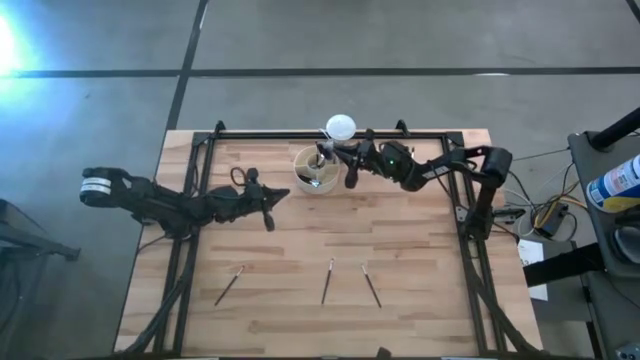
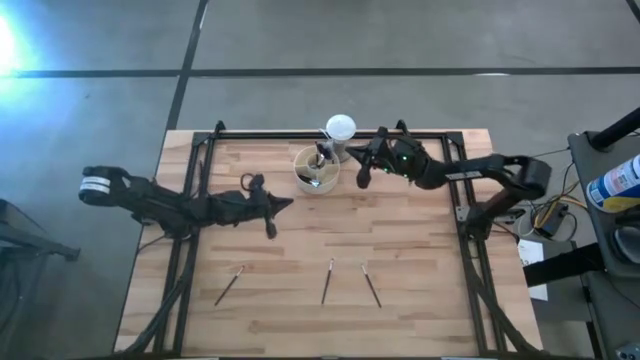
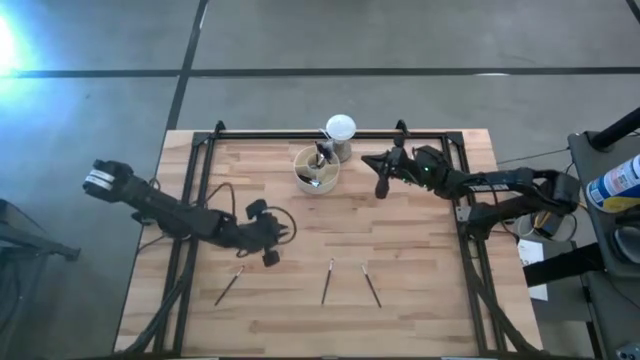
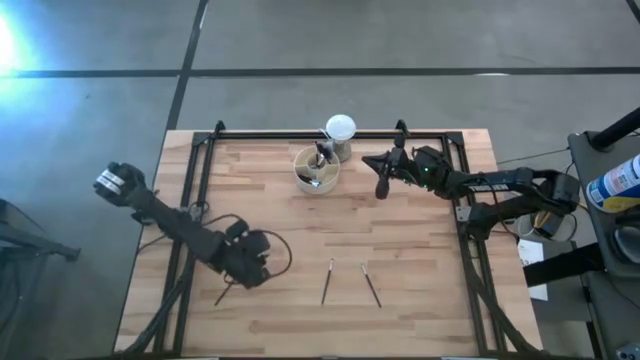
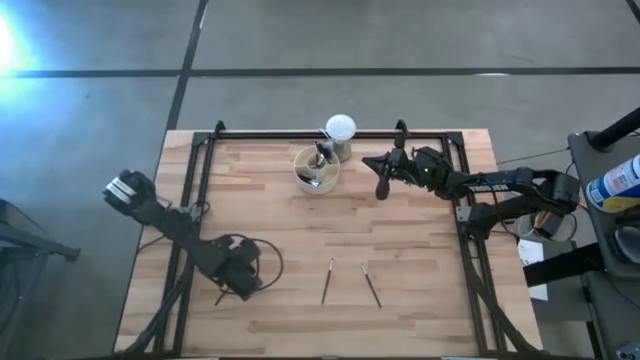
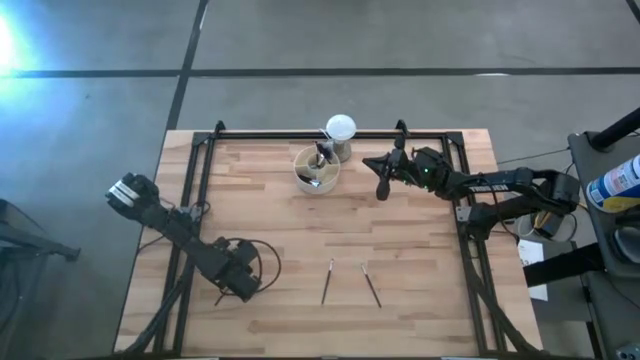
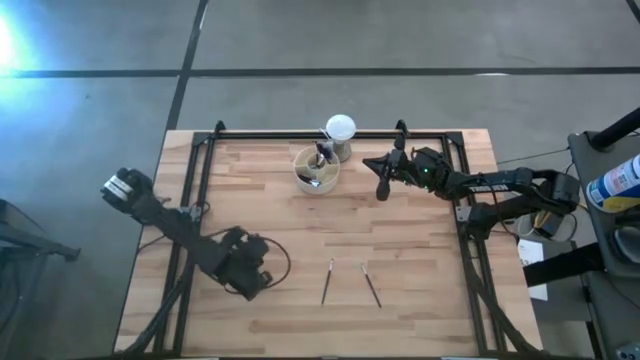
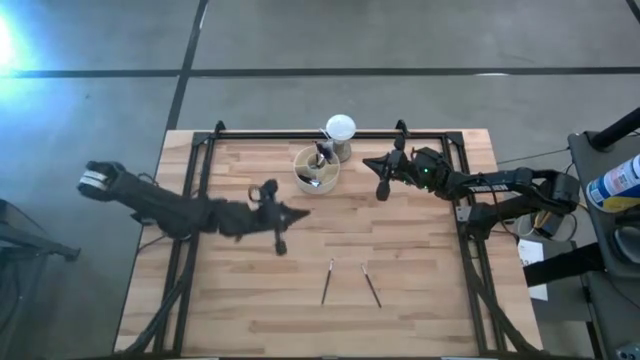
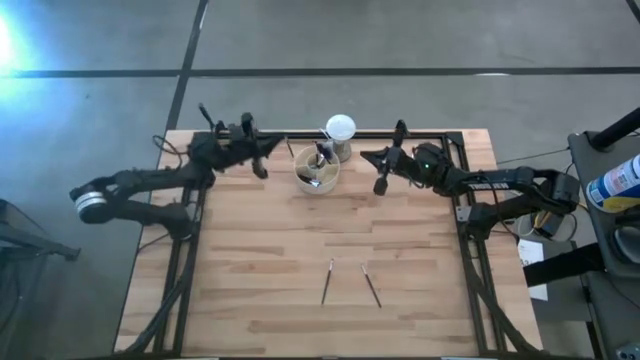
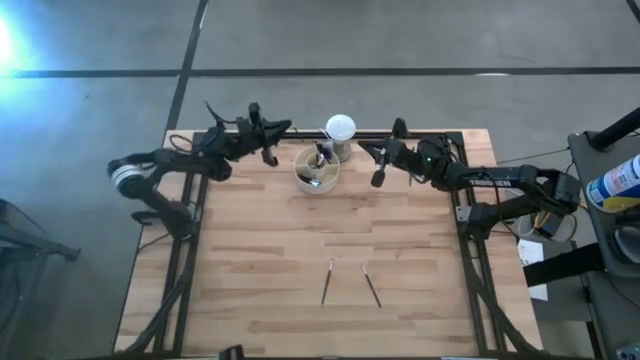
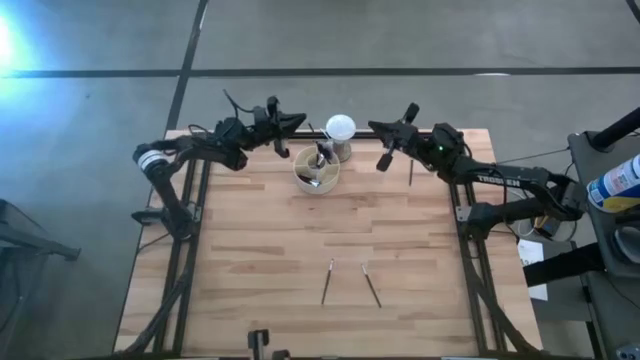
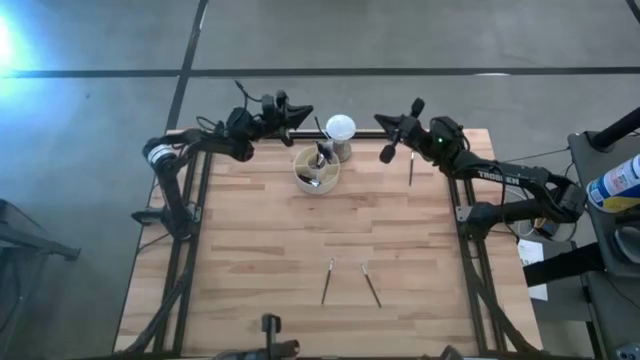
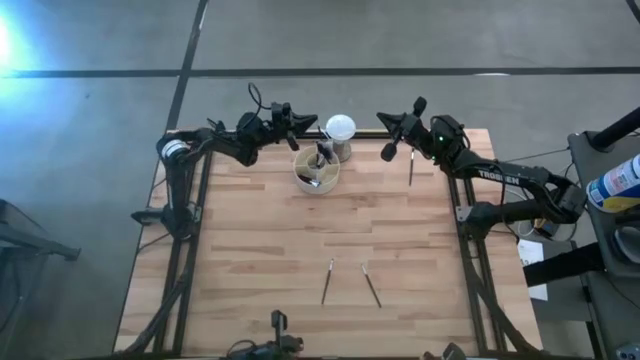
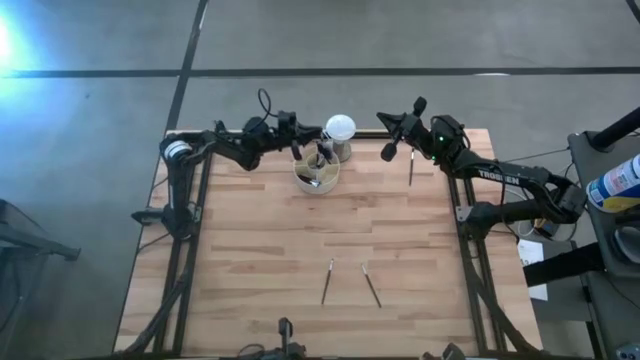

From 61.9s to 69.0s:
Task: Put items in baskets/containers
Put the black eyeshadow brush into the white organizer

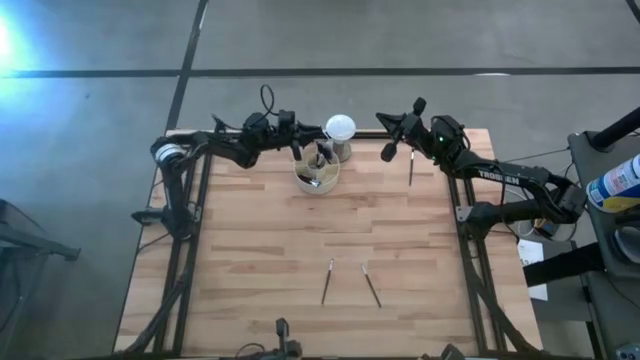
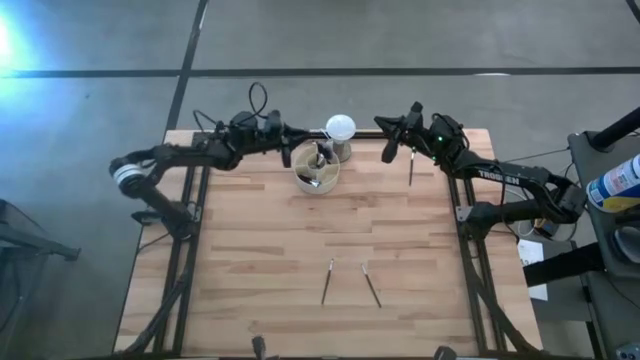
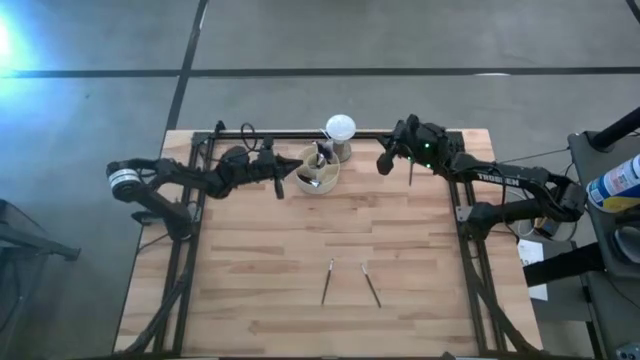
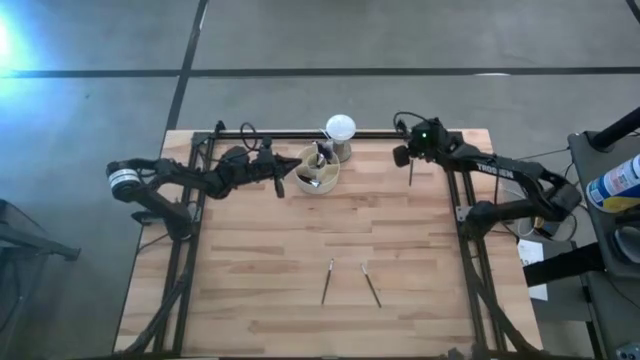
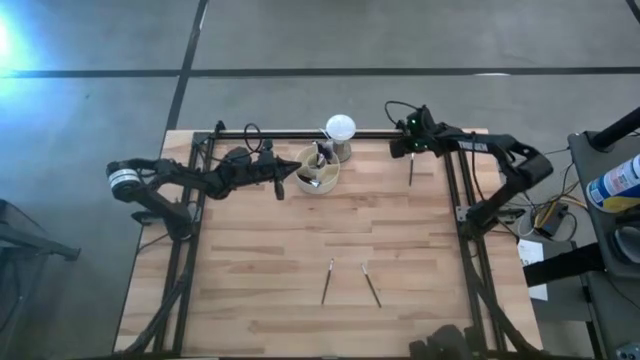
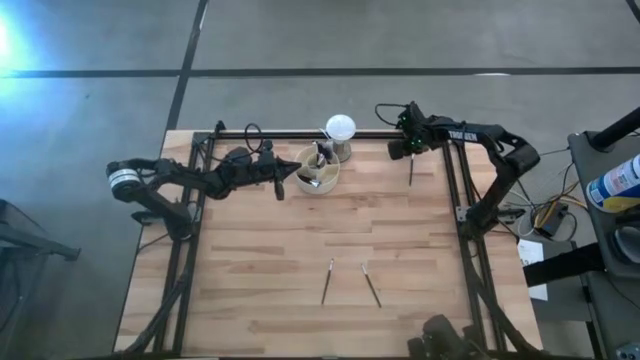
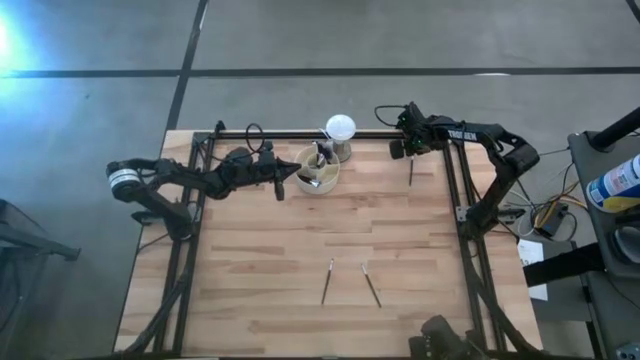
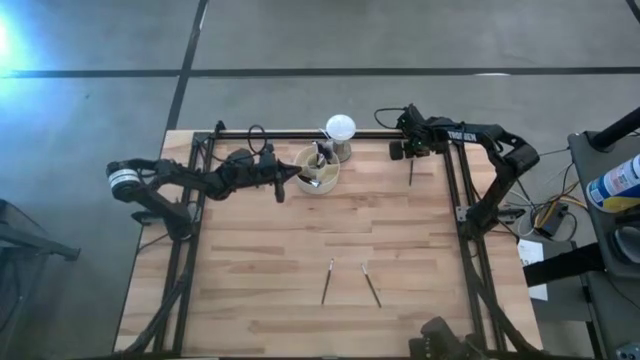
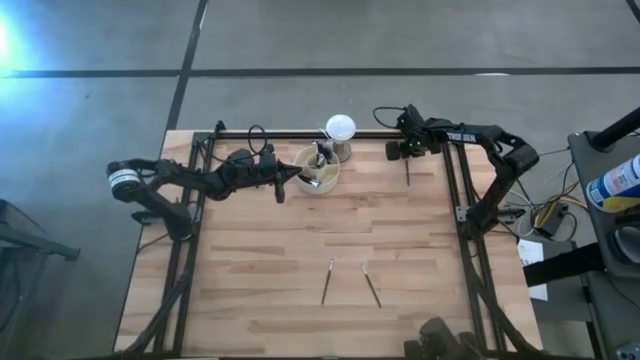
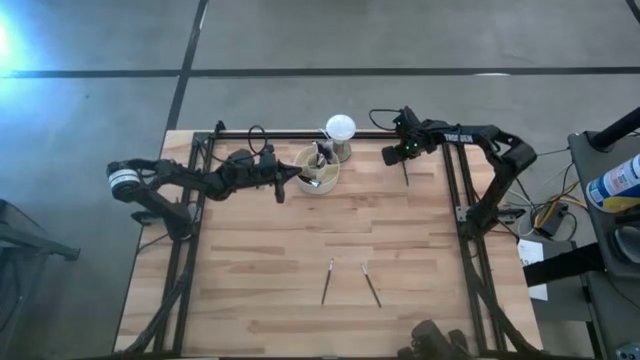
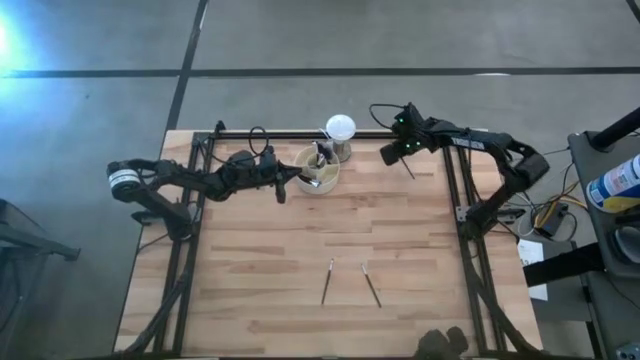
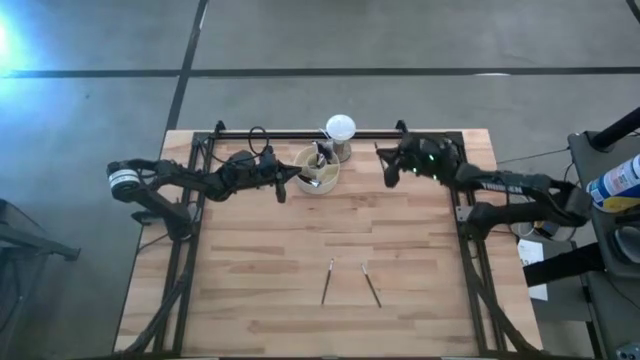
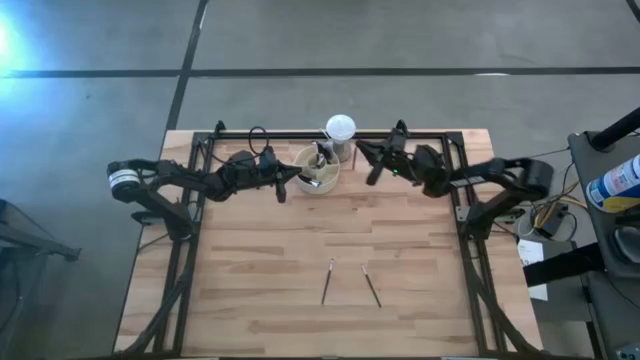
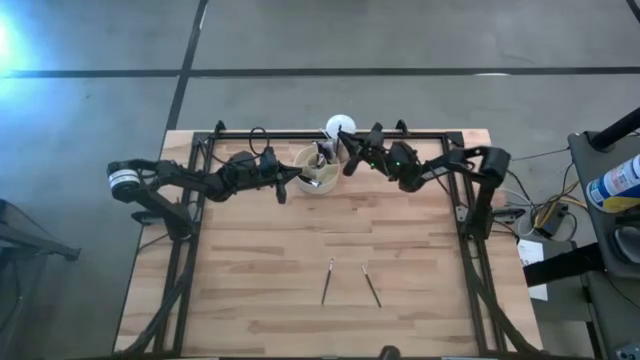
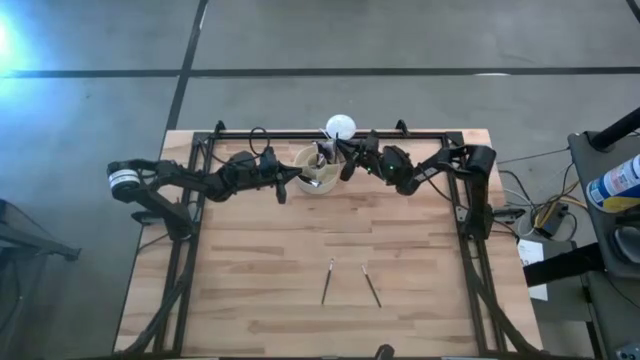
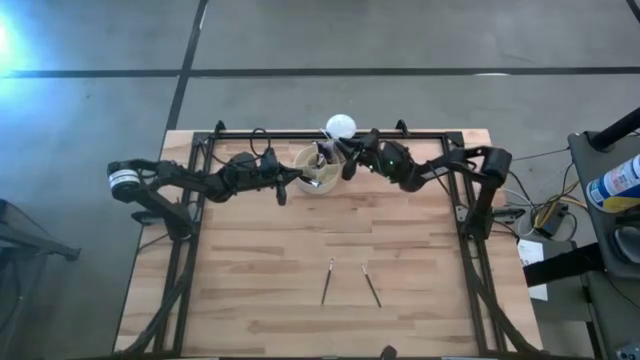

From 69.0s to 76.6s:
Put the black brow brush into the white organizer

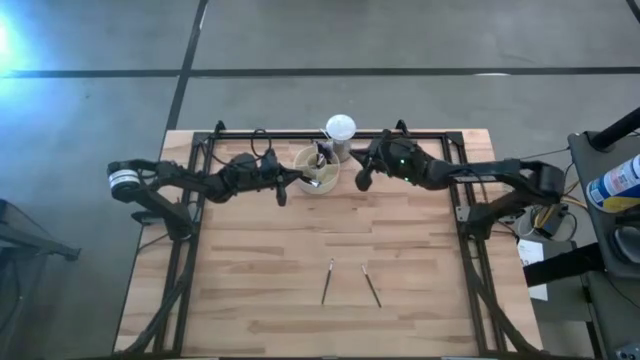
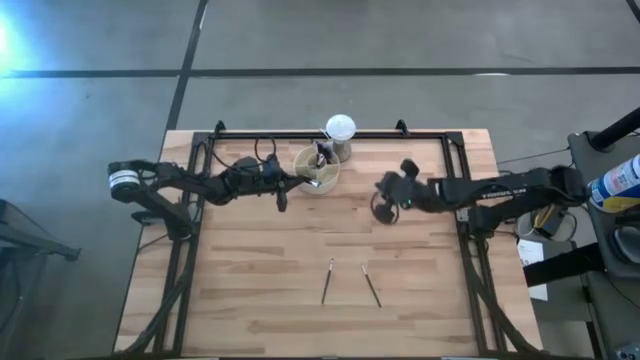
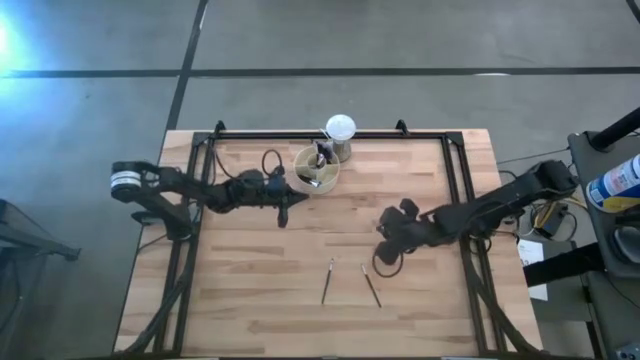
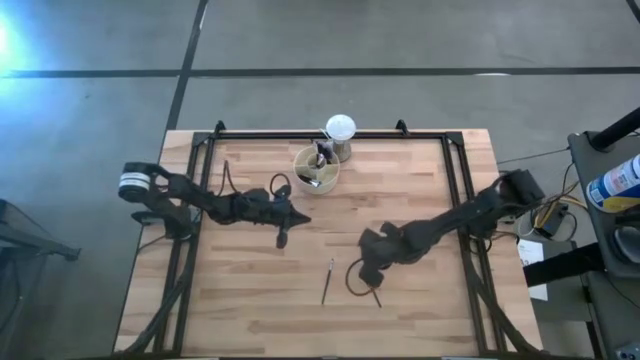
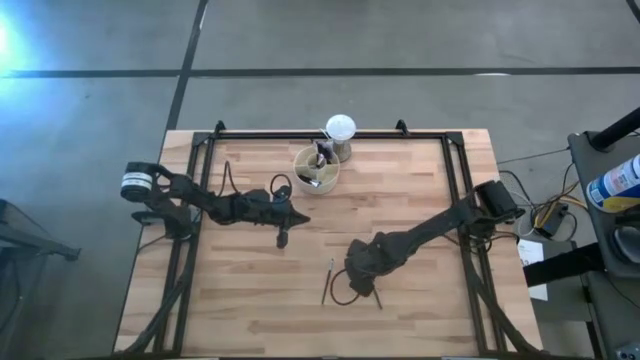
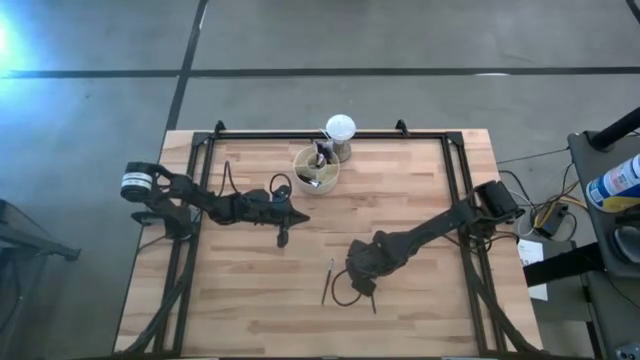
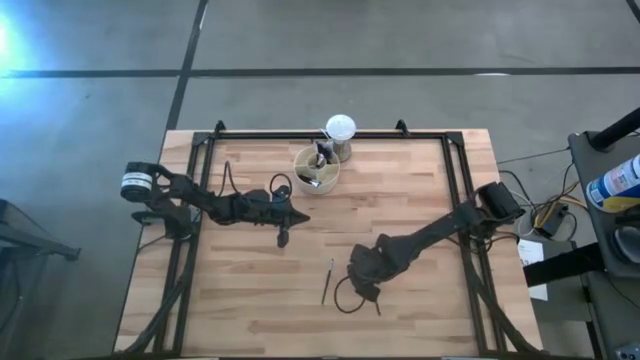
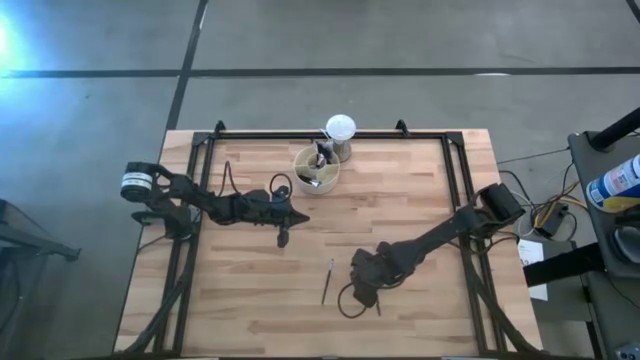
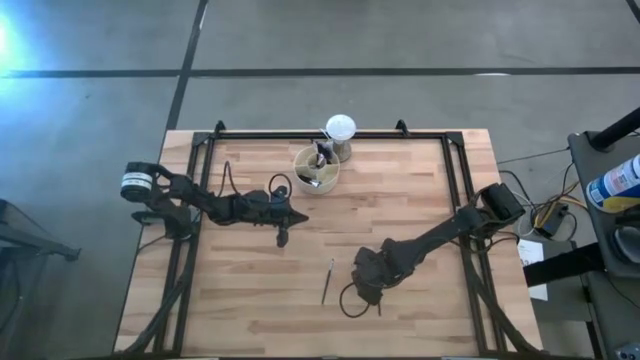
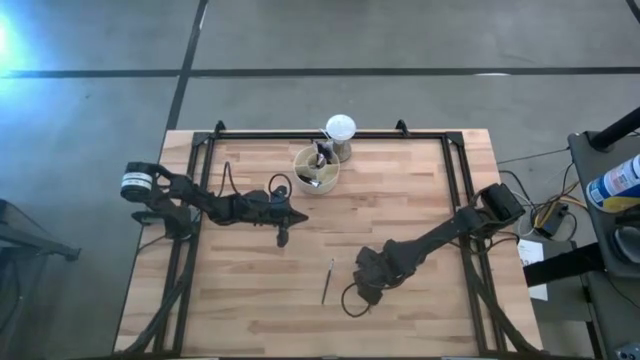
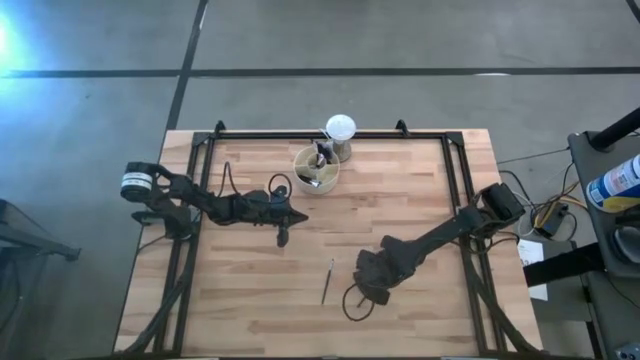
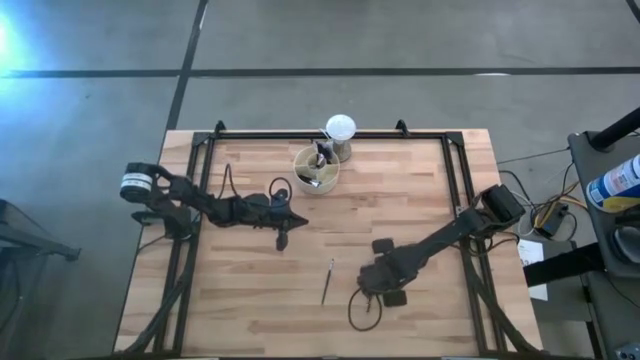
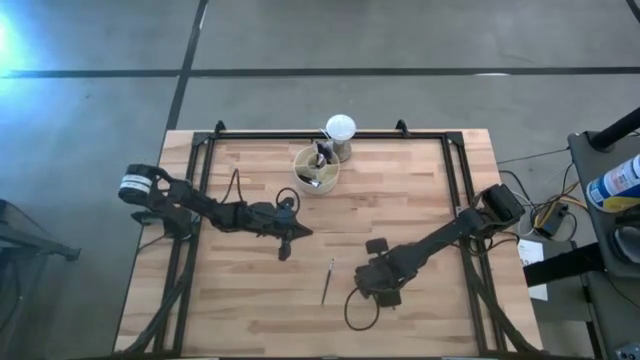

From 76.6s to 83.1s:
Put the black liner brush into the white organizer
